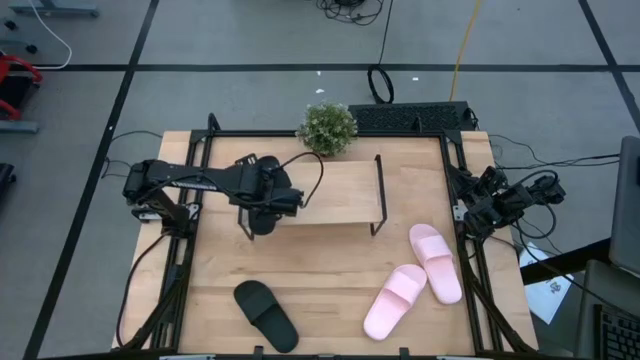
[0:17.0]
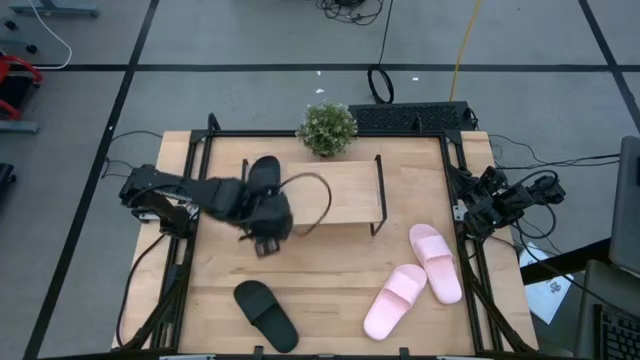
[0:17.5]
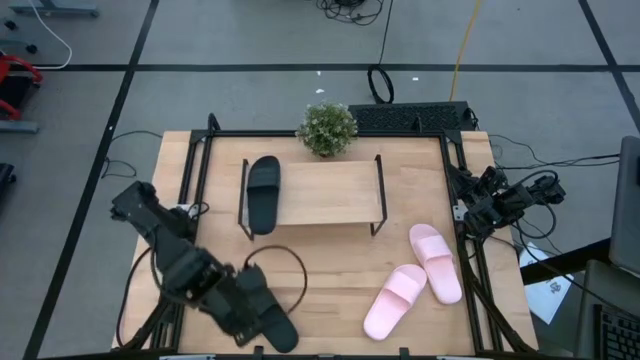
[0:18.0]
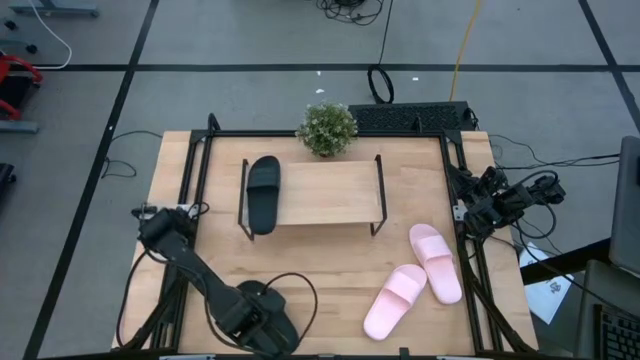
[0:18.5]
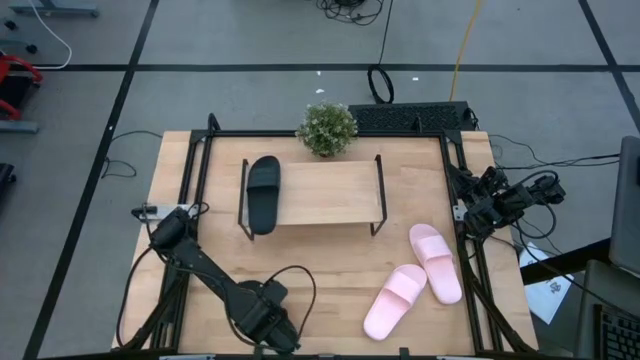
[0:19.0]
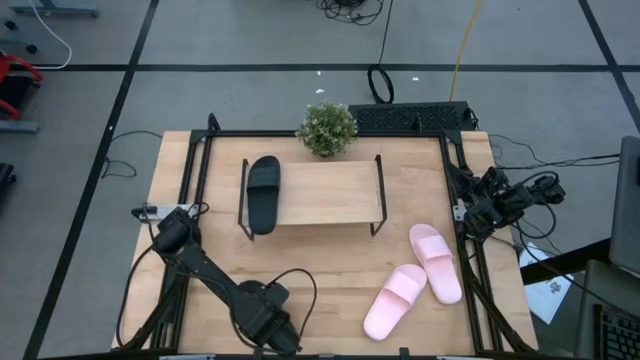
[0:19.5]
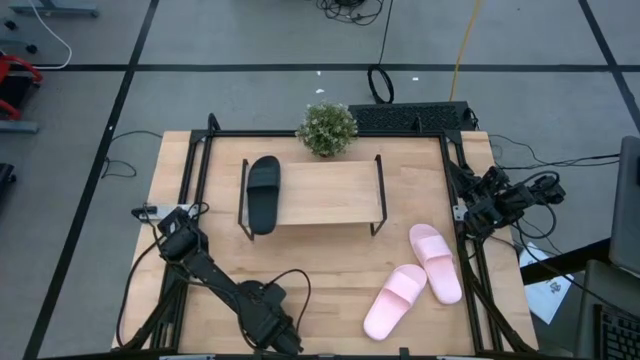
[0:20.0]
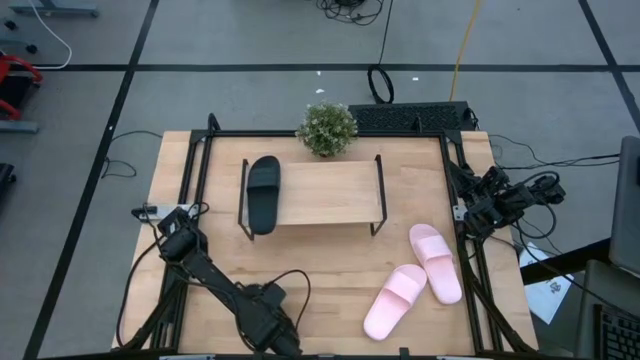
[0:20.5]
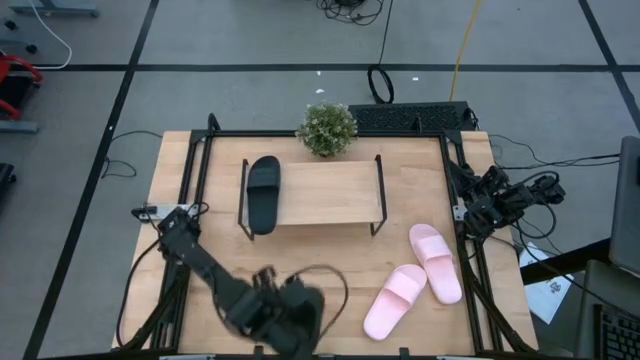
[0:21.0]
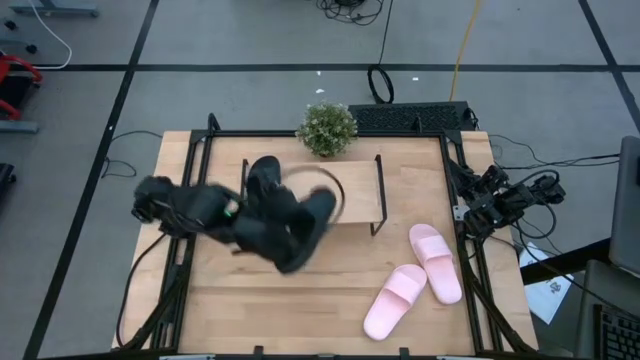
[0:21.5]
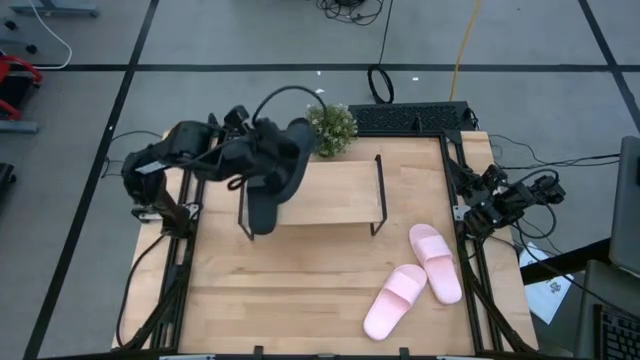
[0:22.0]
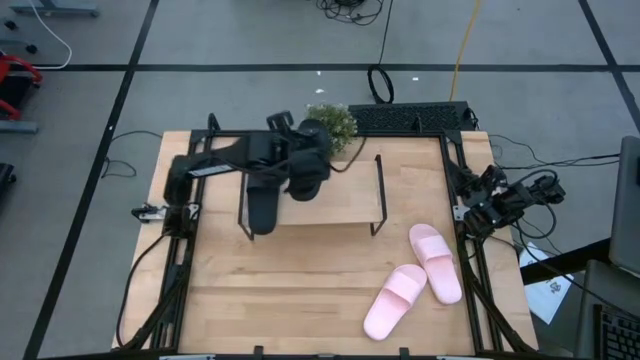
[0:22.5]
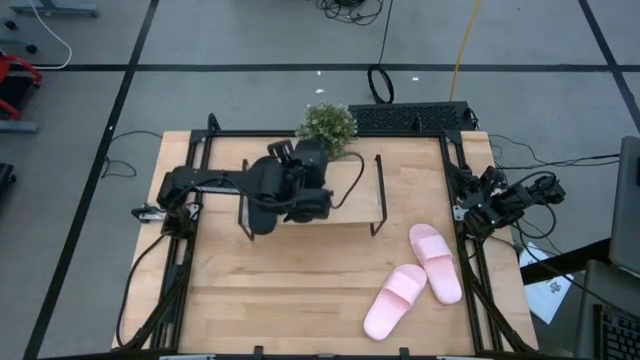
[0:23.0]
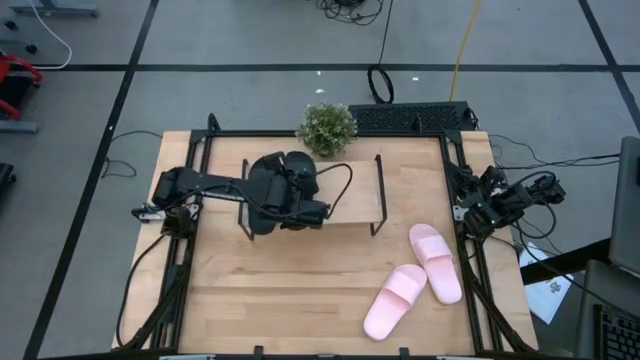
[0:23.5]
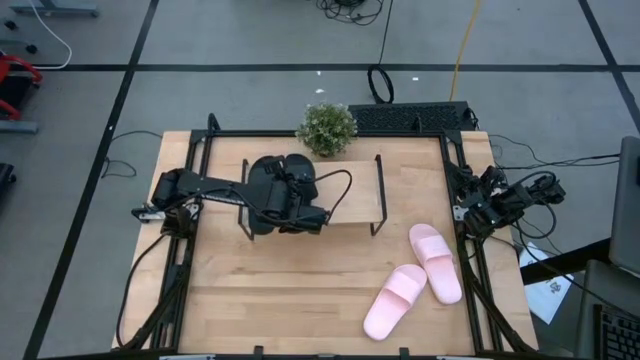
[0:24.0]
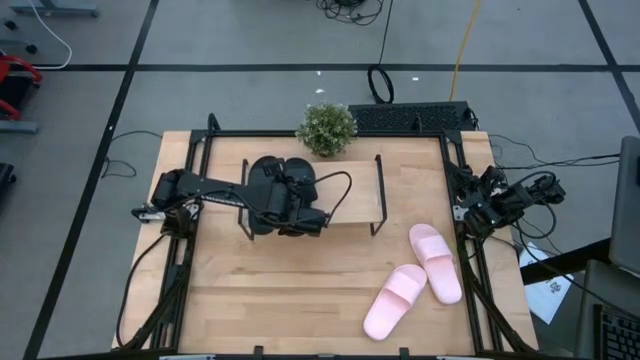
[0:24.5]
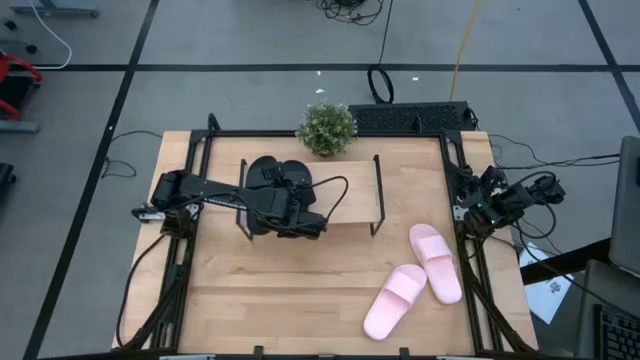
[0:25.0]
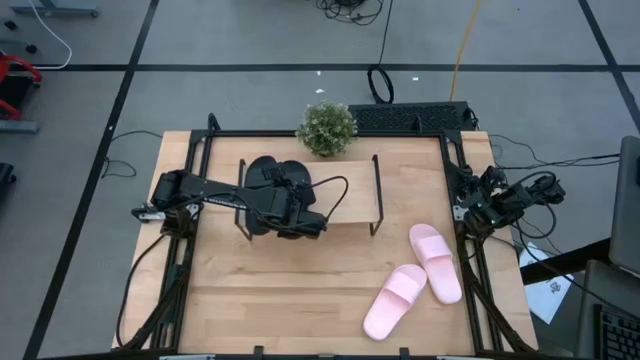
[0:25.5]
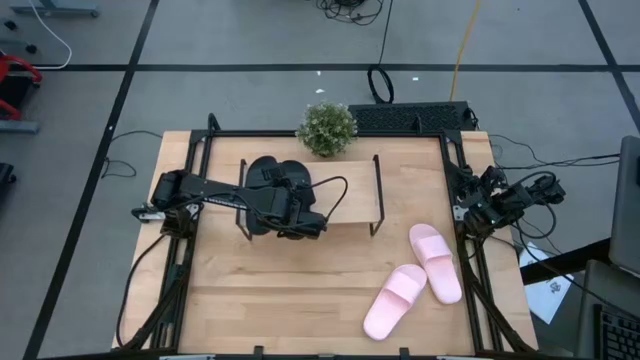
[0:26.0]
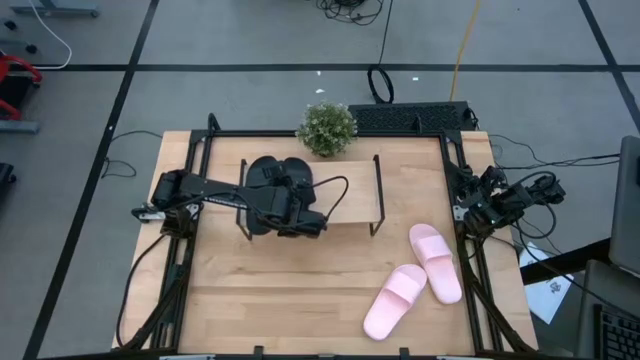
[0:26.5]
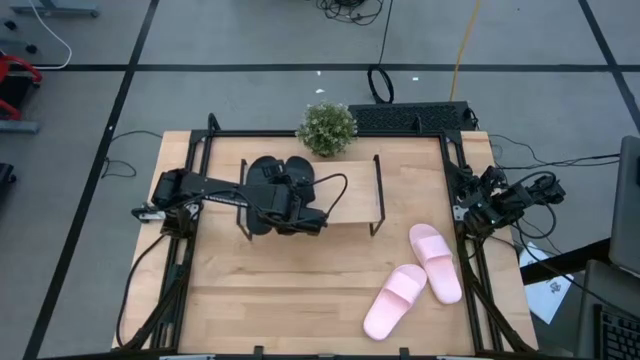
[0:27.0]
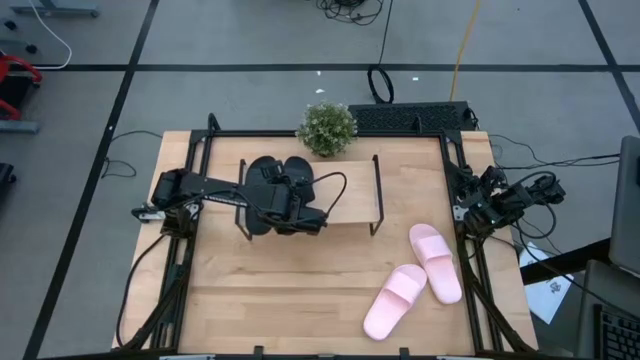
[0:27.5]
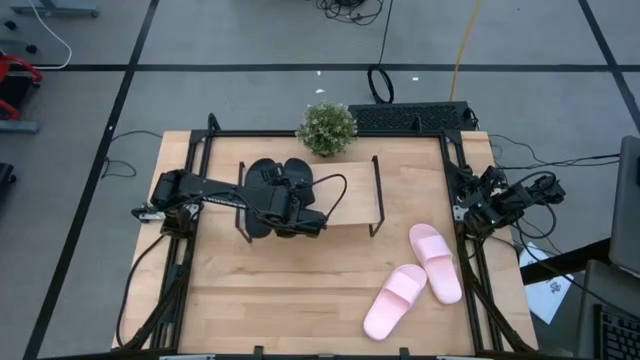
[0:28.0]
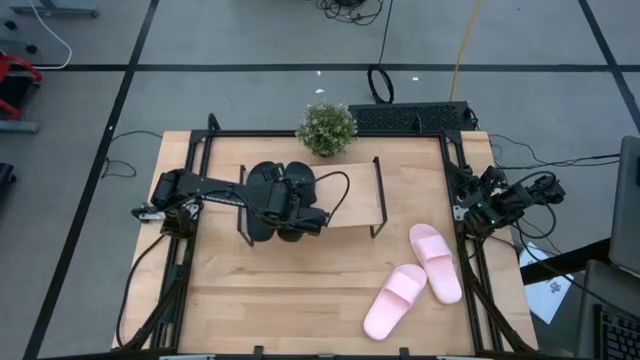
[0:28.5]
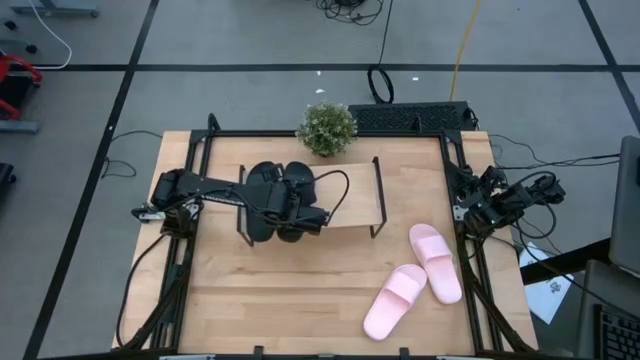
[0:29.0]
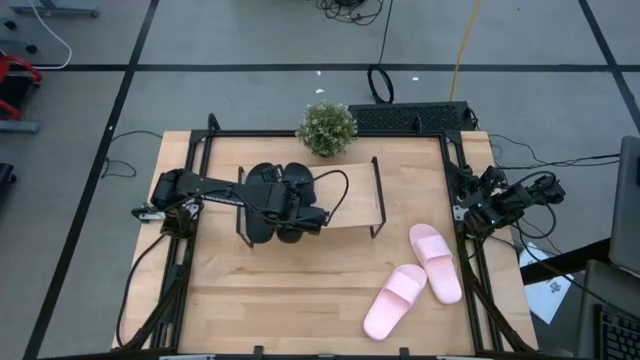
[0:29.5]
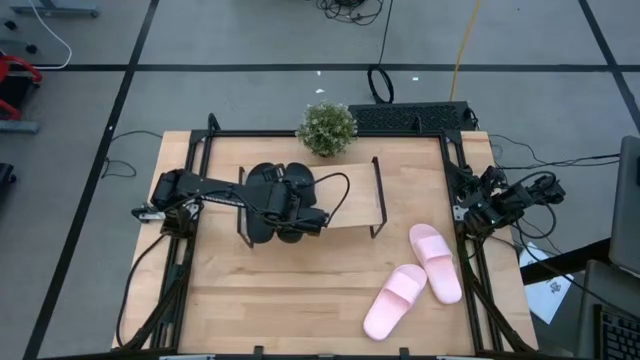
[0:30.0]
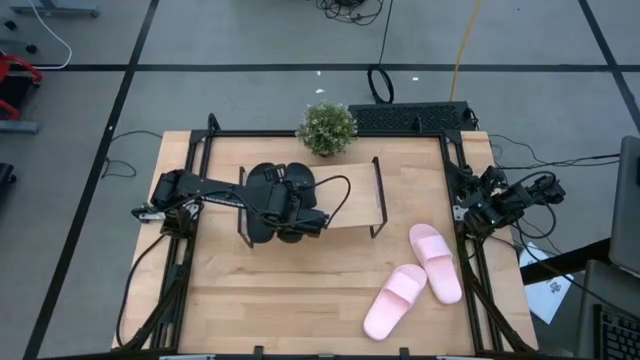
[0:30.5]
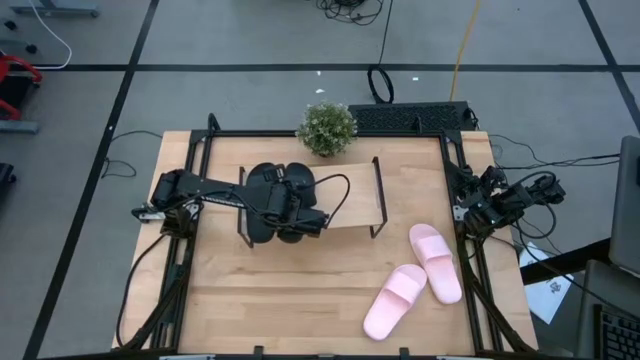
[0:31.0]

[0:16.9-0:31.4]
Task: Pick and place slides into the shelf
Put the black slide on the shelf

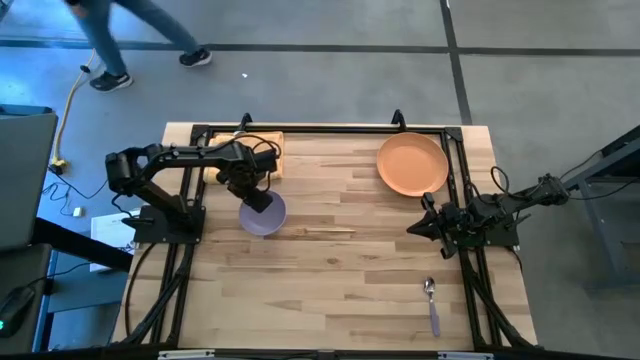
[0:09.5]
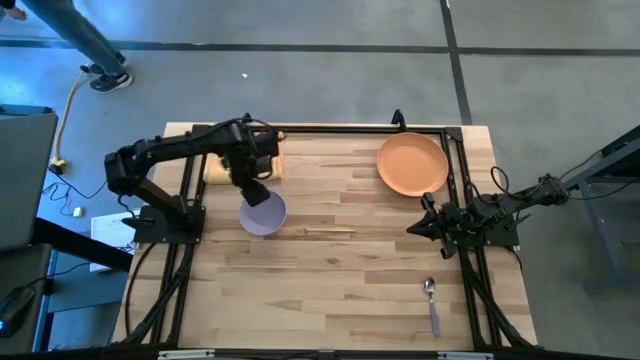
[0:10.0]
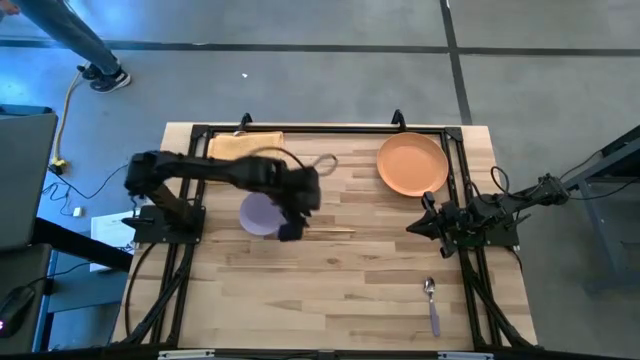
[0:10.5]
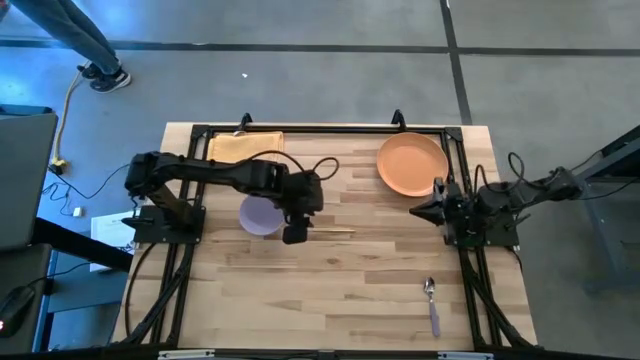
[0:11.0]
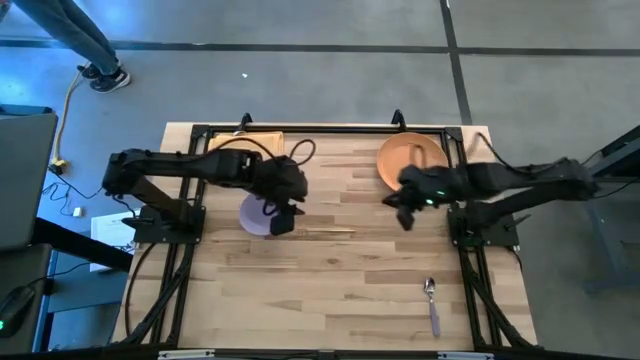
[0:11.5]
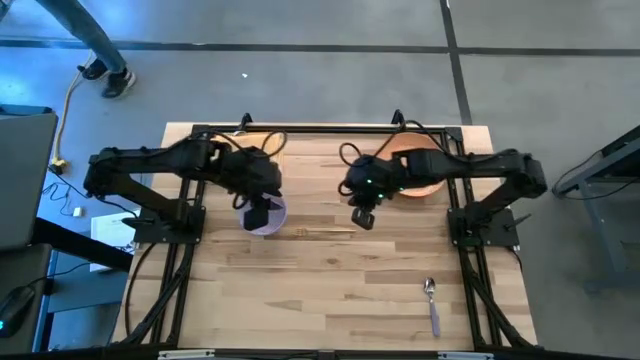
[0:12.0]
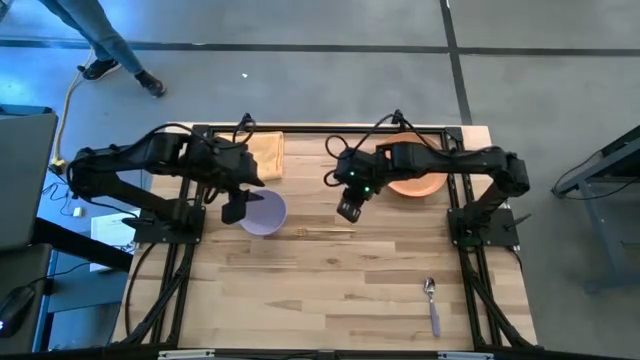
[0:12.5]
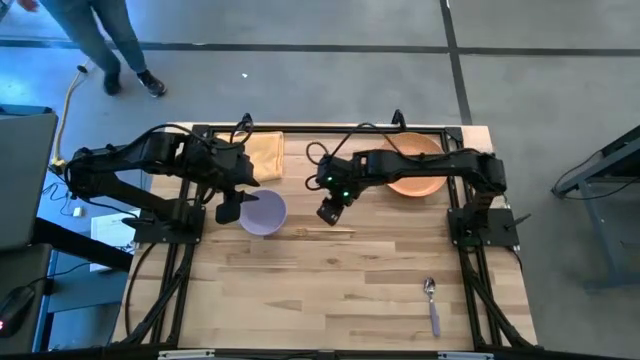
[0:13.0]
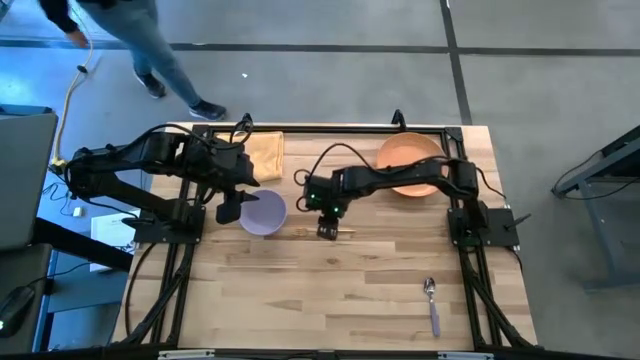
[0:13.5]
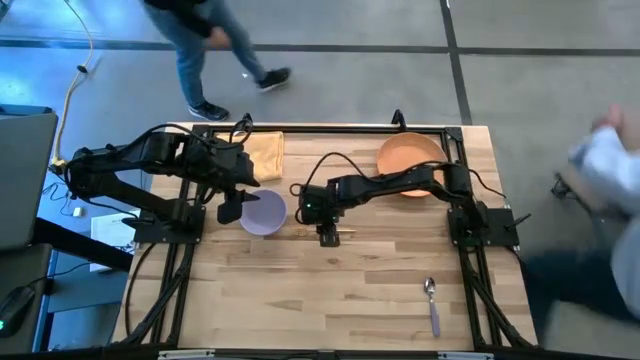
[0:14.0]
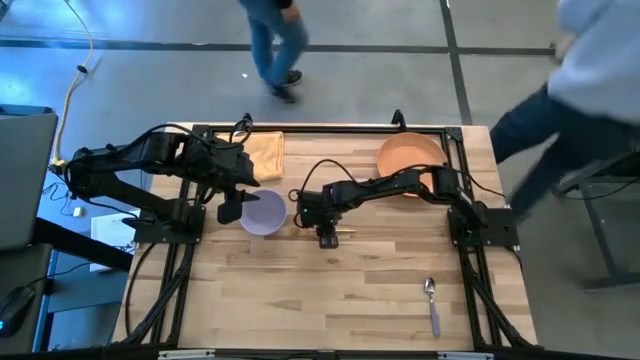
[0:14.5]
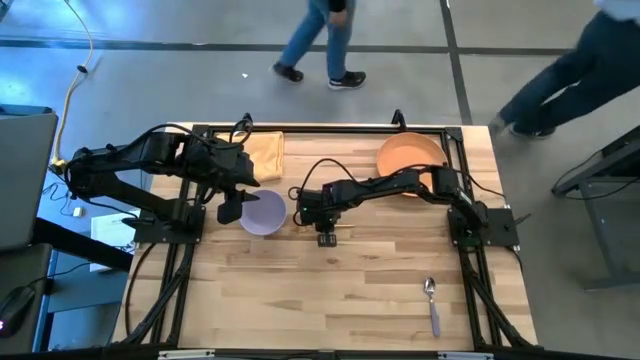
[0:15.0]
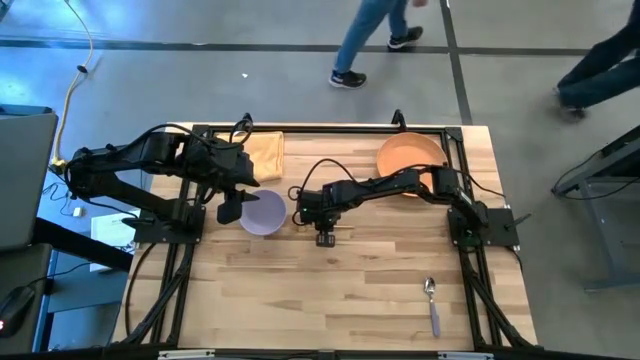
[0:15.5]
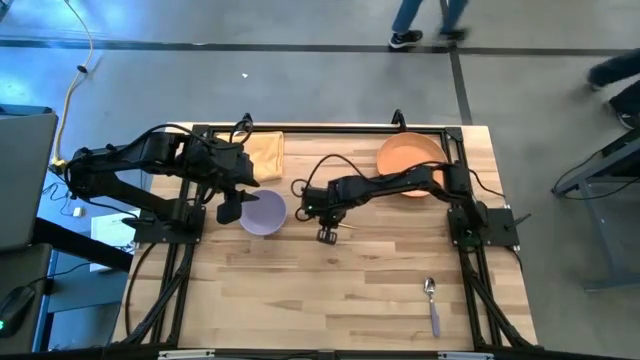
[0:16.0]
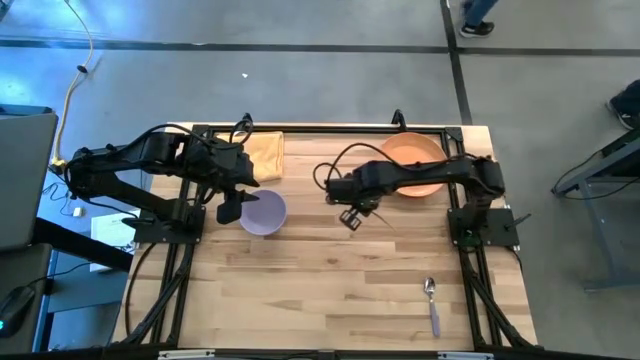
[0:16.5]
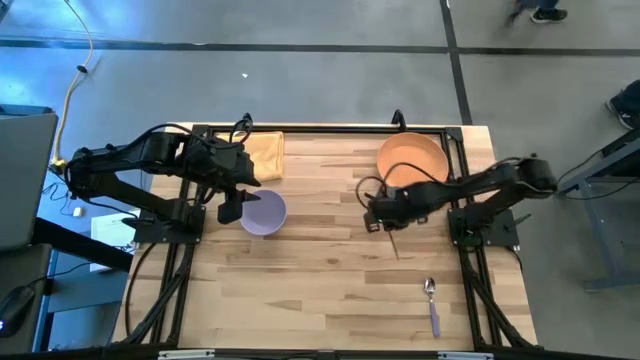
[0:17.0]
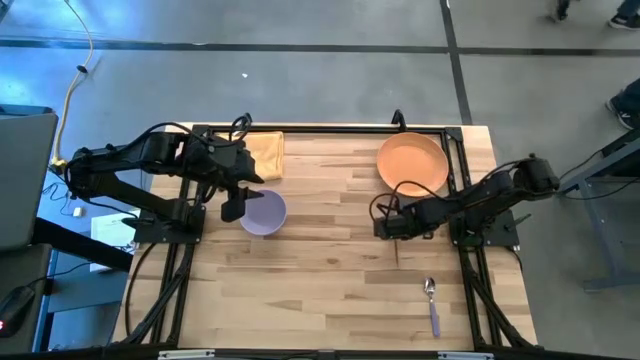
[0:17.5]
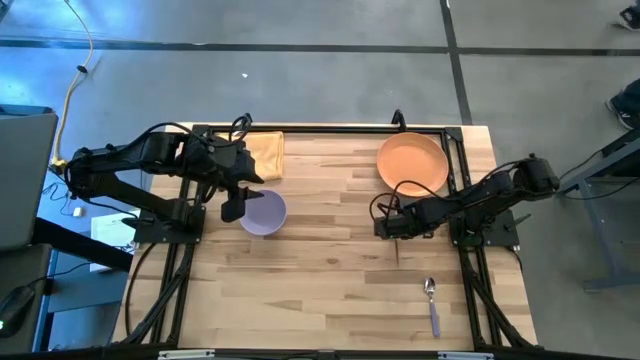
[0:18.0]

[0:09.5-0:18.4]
Task: Set table place
Move the gold fork to the middle right of the table
